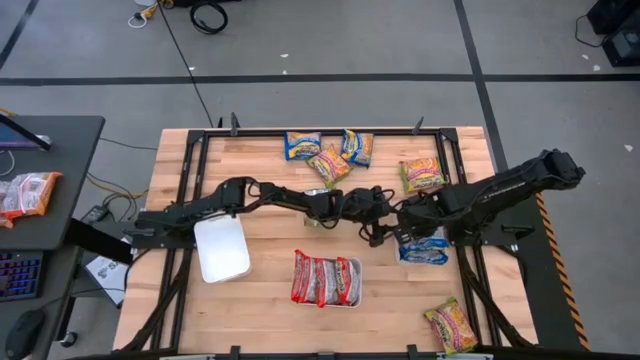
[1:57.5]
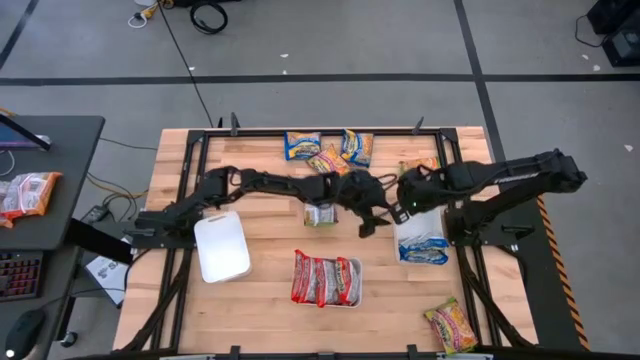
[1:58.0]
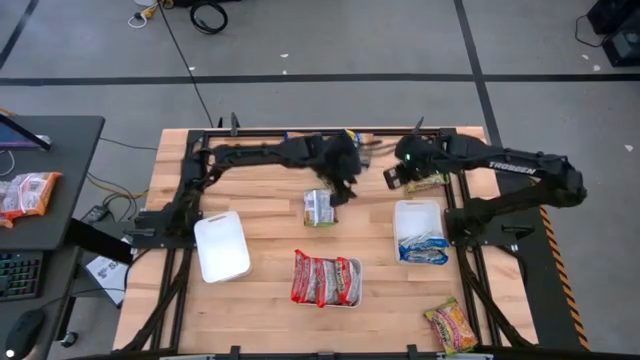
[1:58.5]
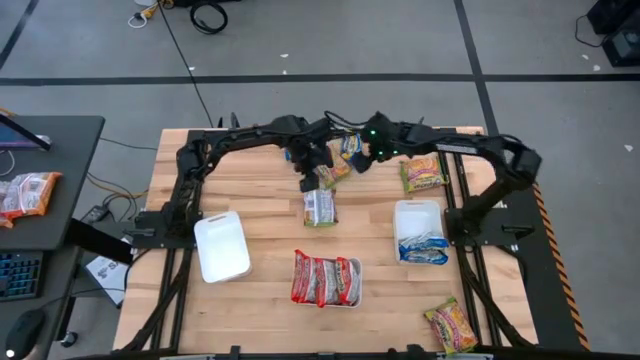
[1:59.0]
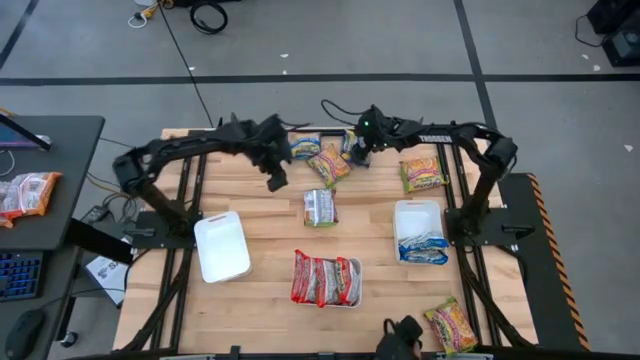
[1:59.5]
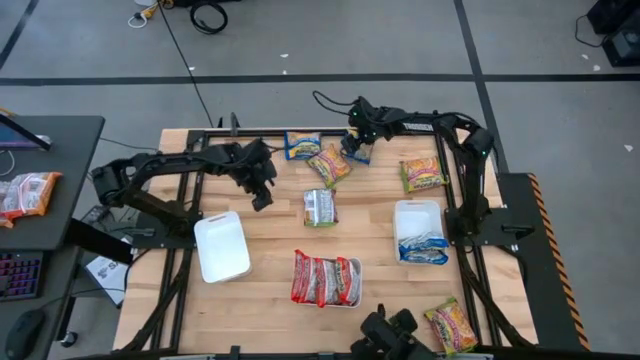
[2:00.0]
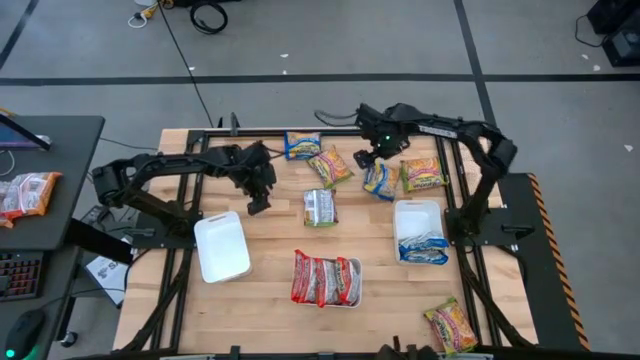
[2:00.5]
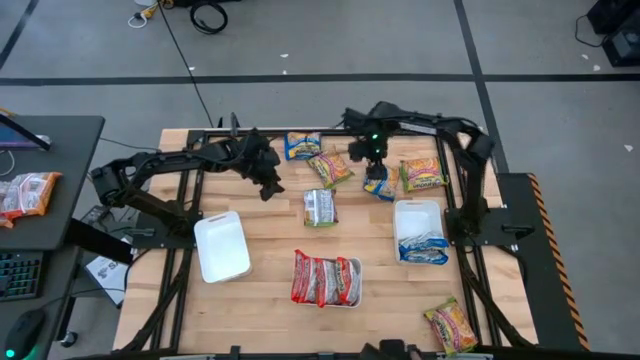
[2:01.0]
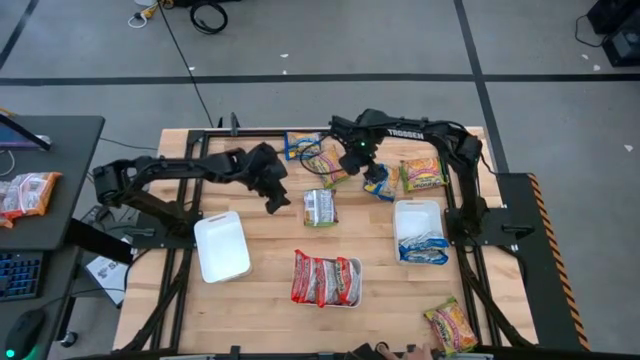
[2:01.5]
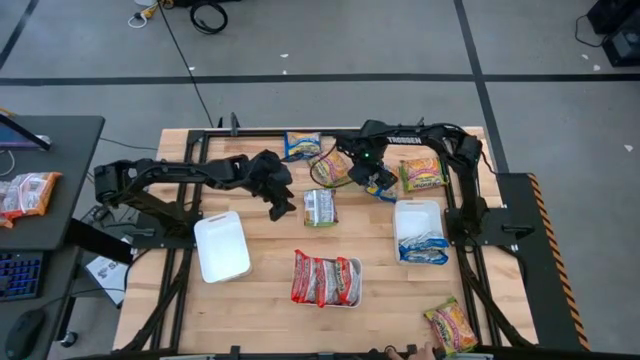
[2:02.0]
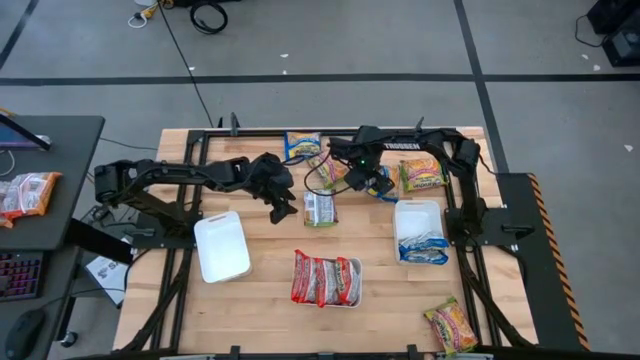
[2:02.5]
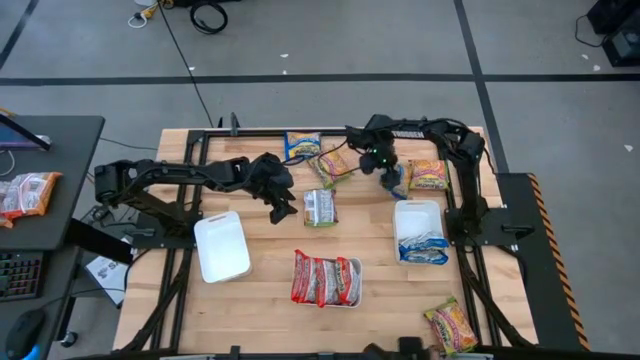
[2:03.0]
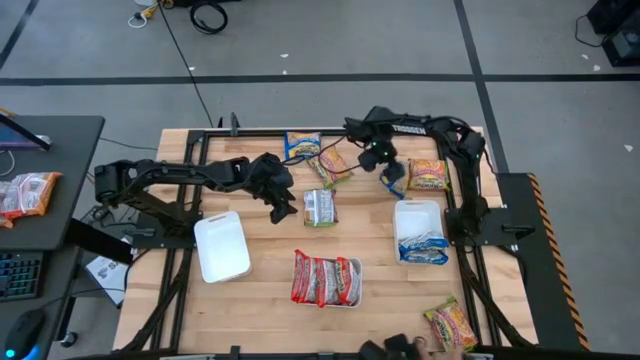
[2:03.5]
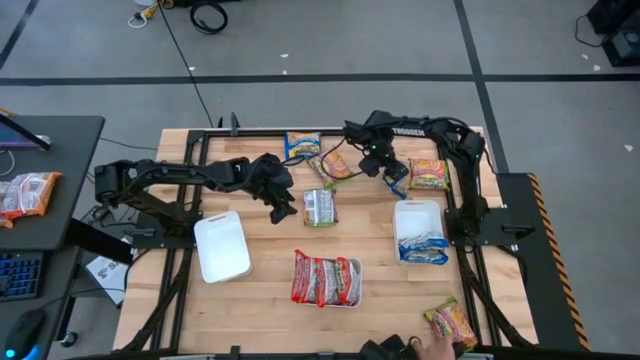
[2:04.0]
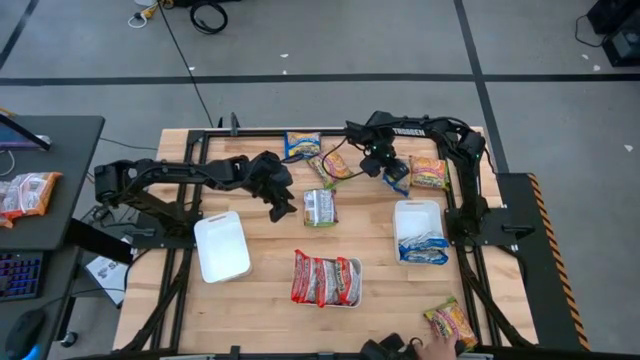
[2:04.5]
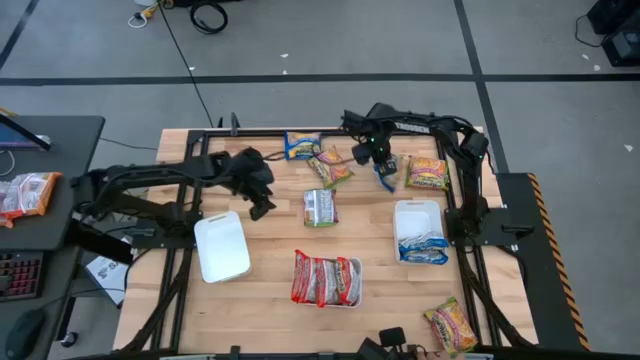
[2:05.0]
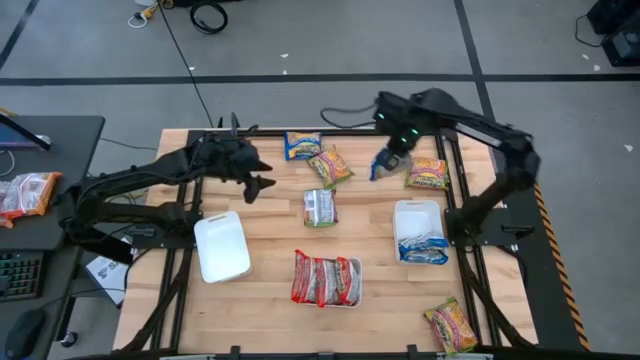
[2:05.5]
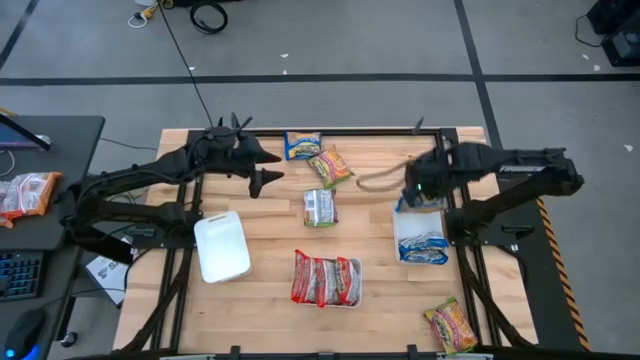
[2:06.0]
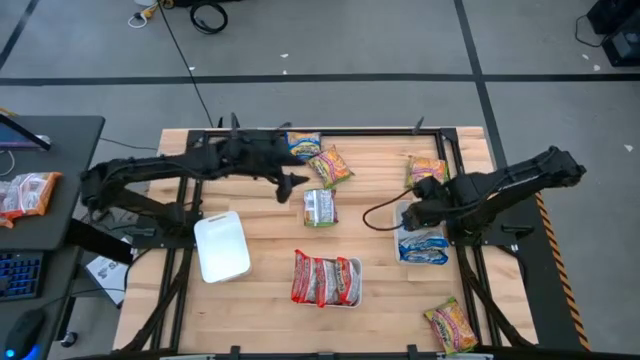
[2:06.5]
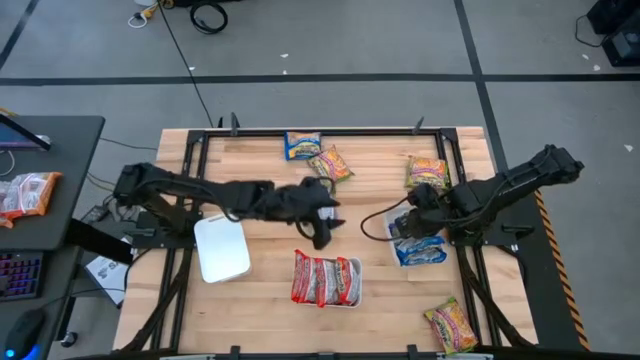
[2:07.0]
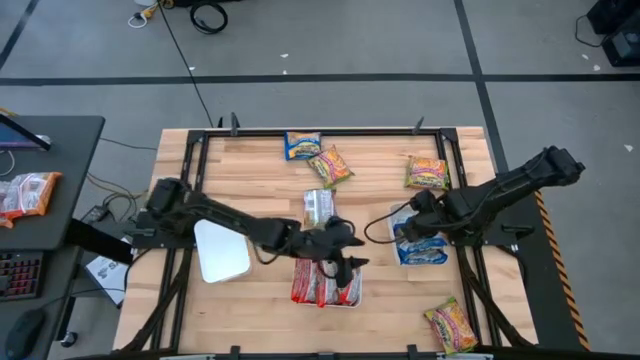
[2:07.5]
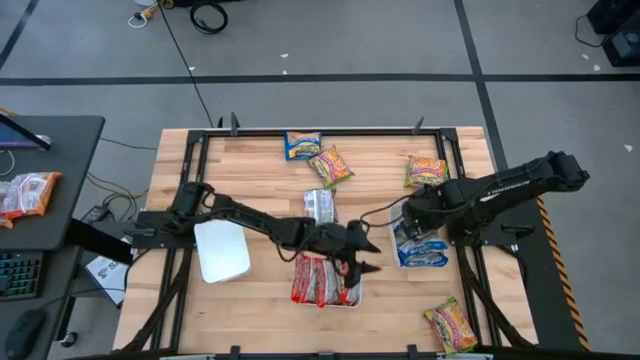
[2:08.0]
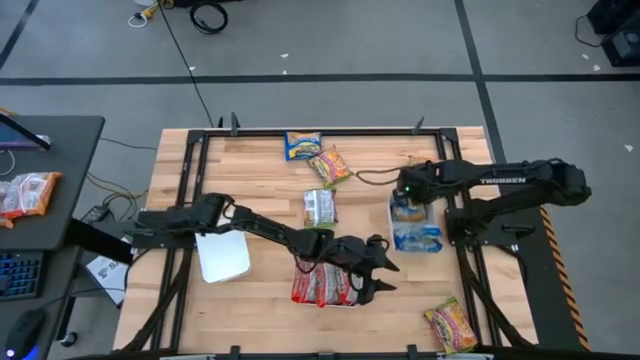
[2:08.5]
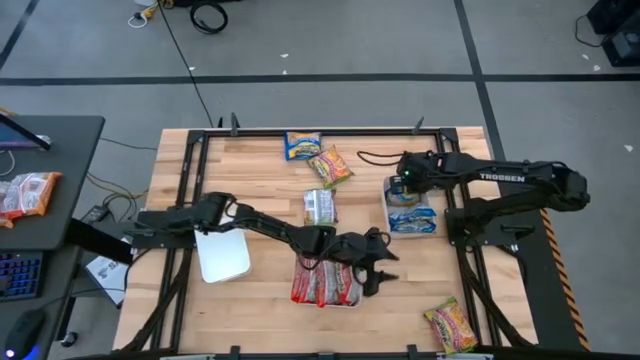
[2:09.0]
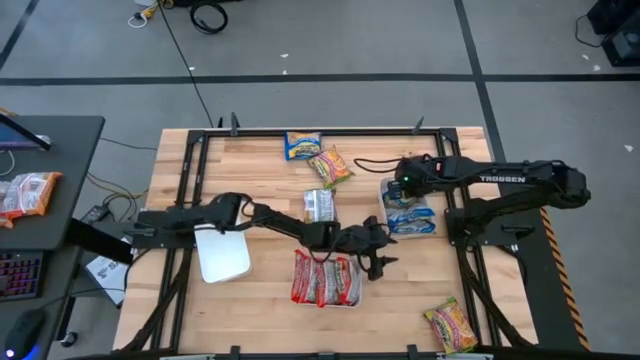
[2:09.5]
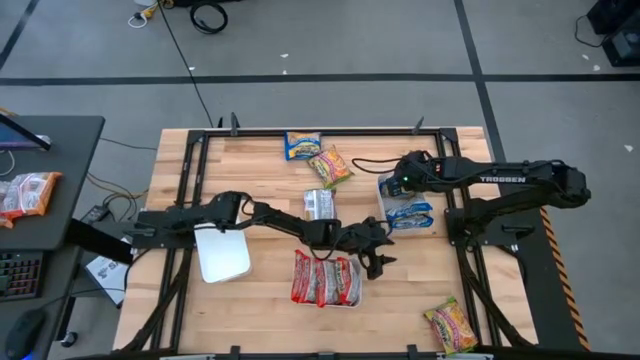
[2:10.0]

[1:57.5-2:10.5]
Task: Sort Maruchan noodles
Put the right blue noodle pack into the right white bin

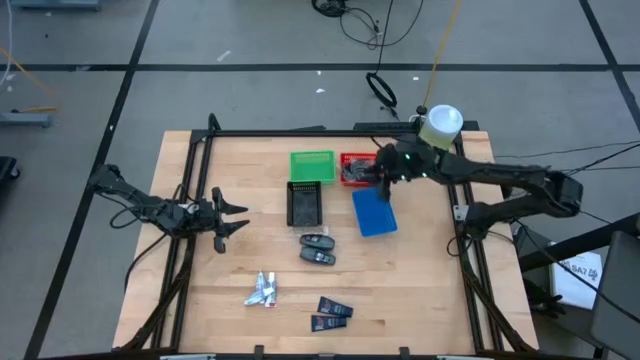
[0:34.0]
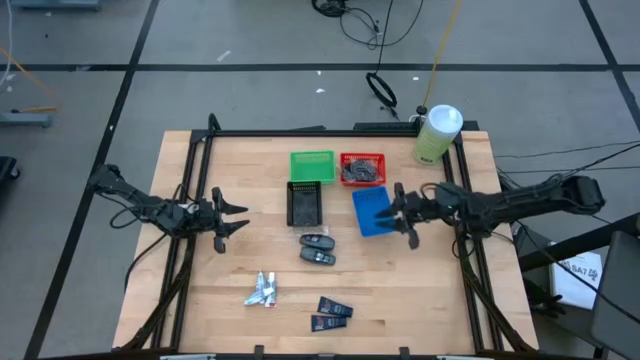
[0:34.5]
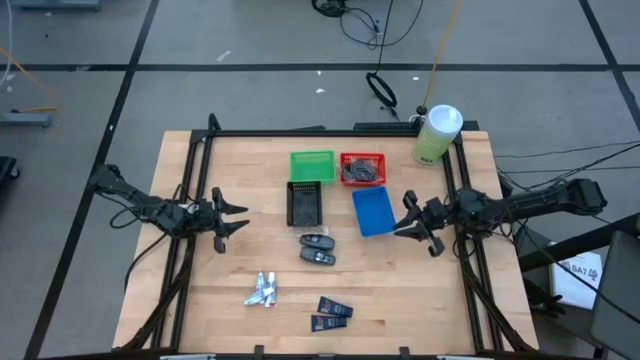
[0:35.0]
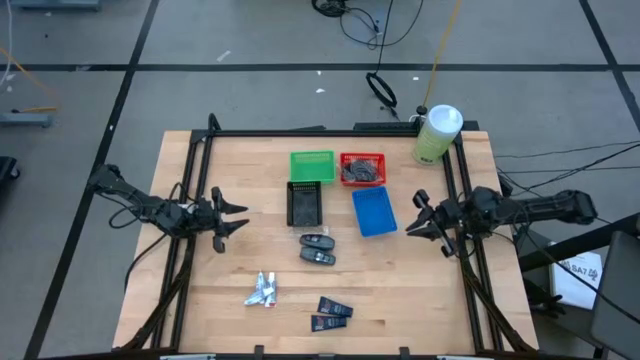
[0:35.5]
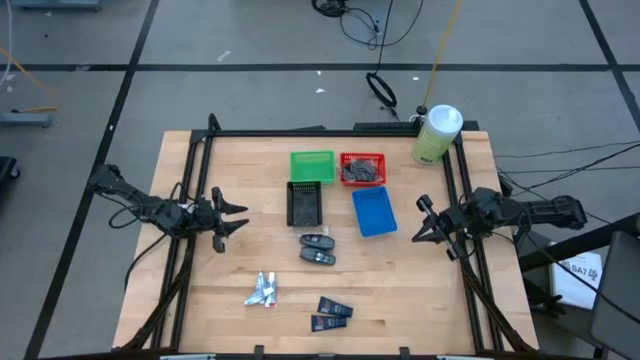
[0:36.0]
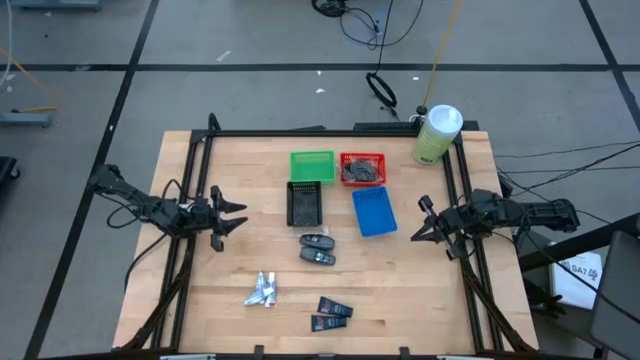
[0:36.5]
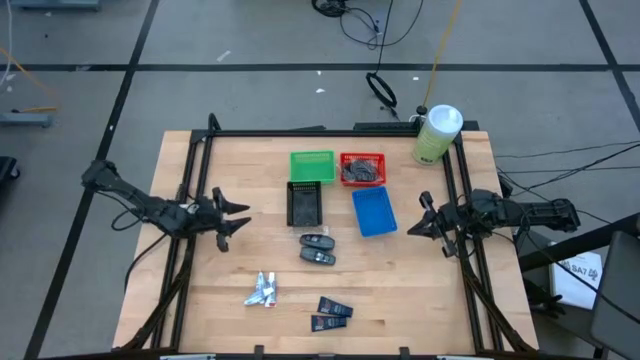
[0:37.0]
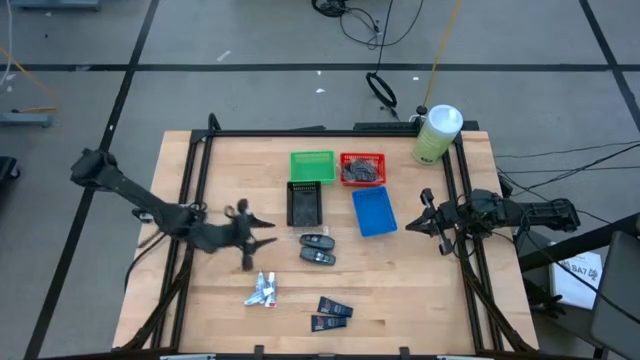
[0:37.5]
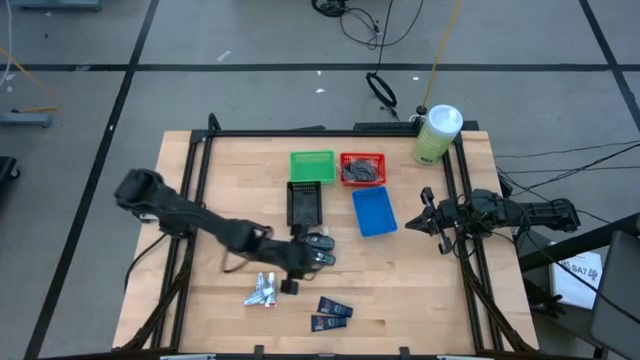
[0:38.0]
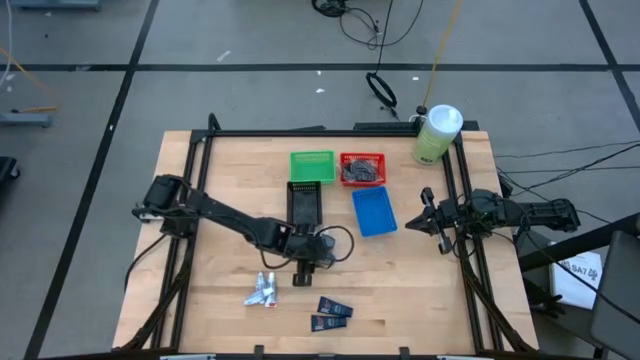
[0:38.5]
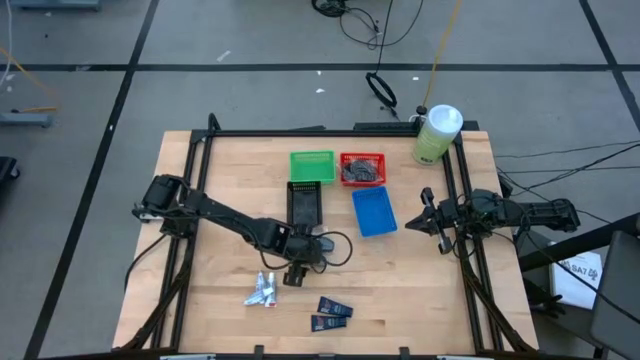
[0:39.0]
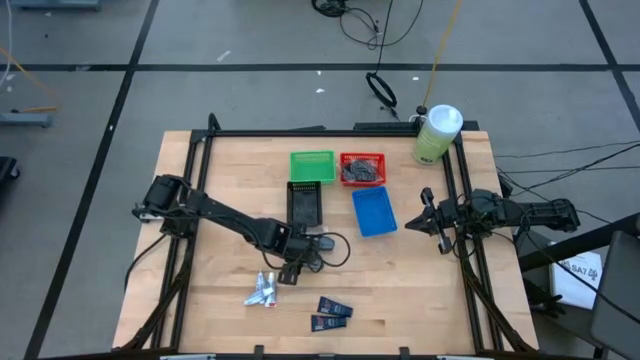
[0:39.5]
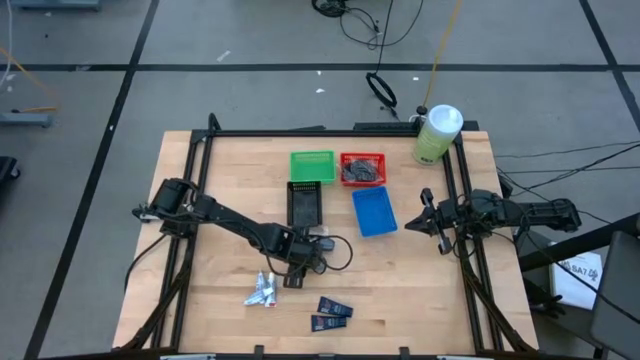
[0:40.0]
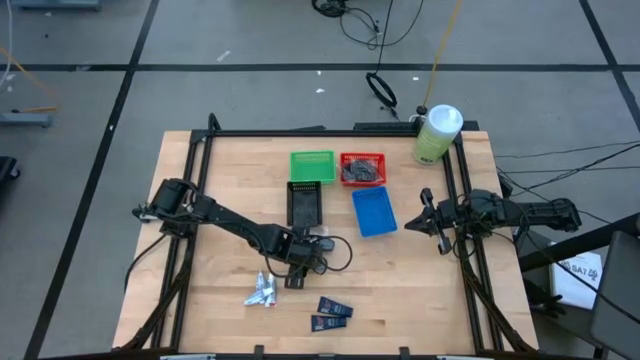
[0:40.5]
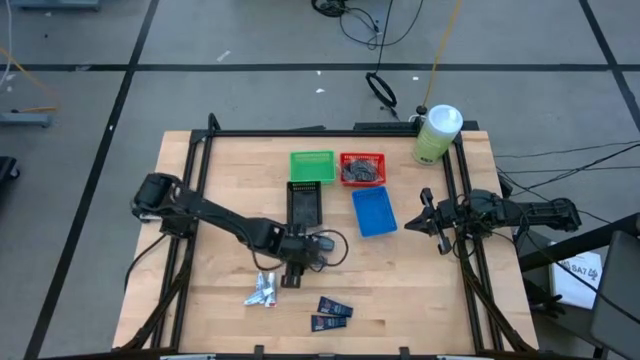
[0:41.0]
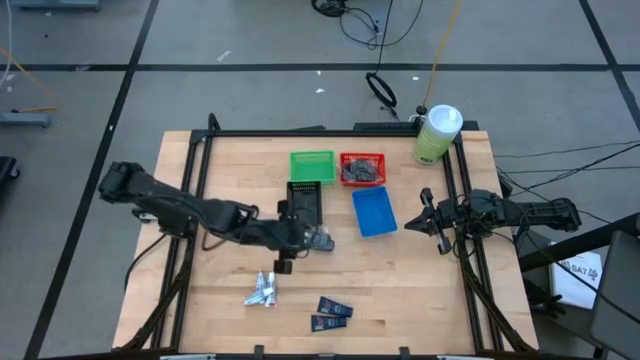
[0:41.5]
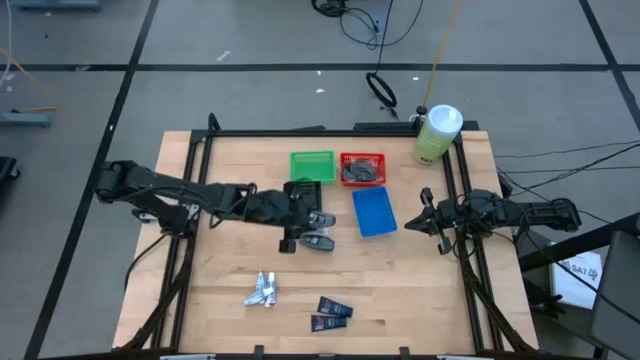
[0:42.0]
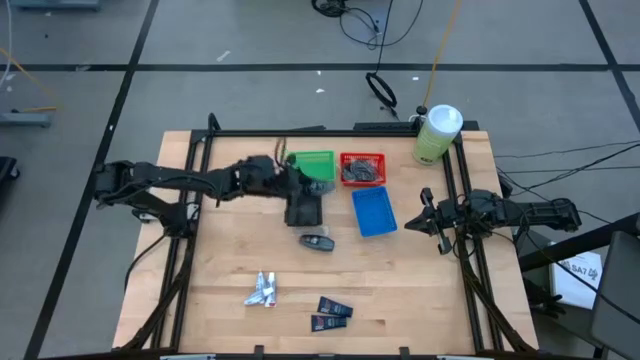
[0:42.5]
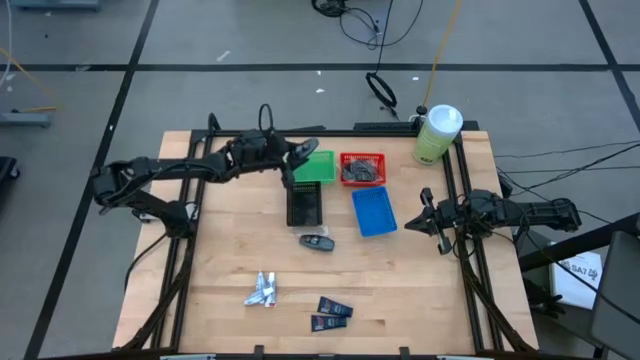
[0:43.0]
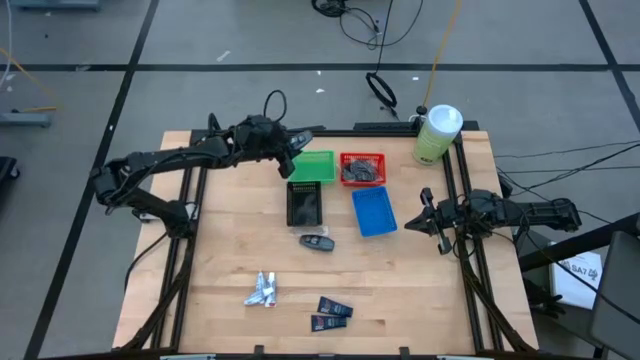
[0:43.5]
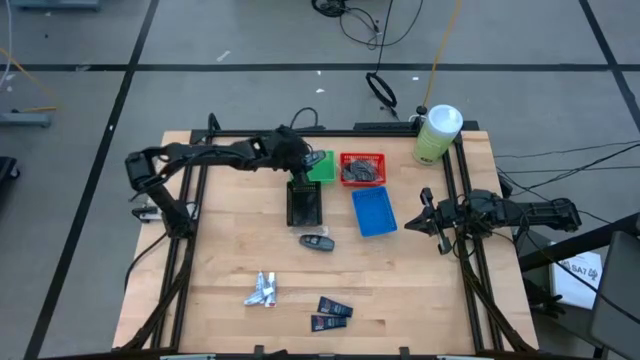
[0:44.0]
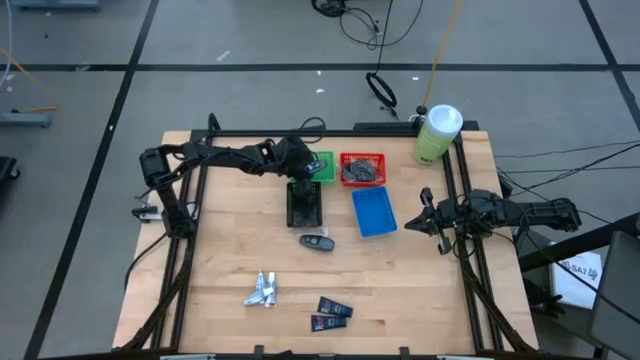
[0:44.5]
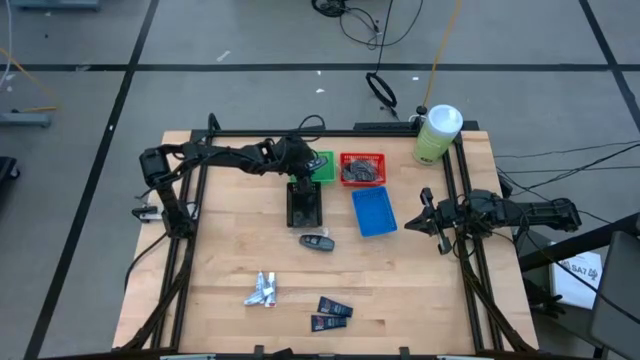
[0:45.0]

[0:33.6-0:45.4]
Task: Pick & Place Travel size toiletries
Put the bottom gray deodorant into the green bin
